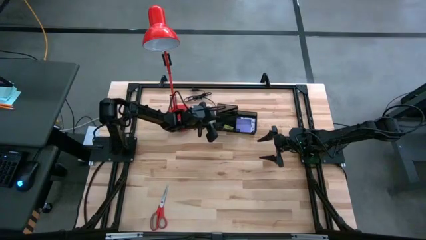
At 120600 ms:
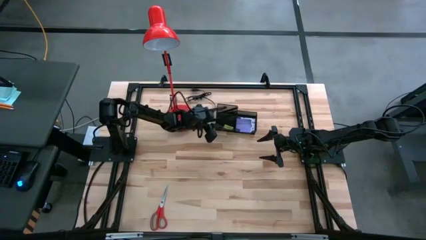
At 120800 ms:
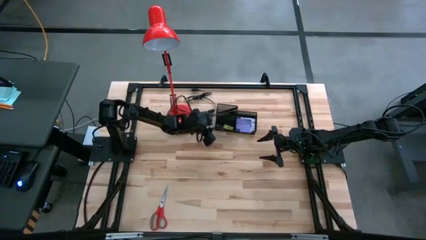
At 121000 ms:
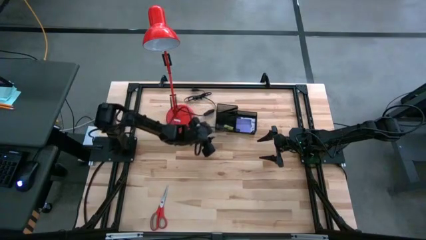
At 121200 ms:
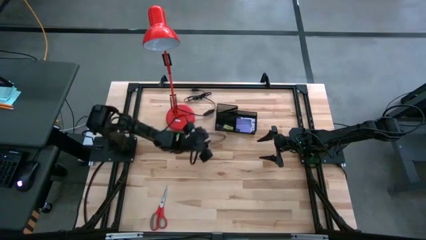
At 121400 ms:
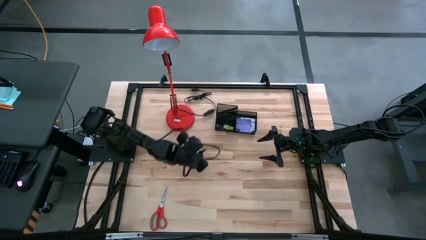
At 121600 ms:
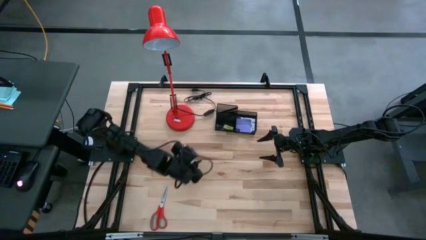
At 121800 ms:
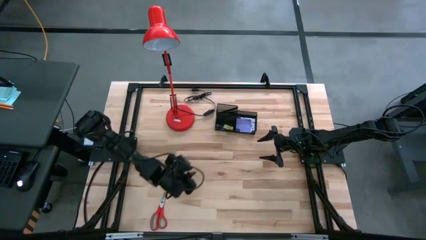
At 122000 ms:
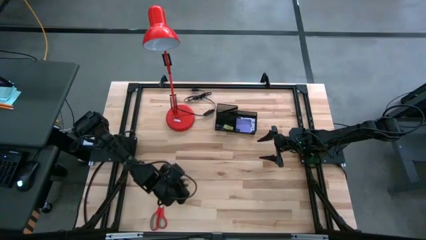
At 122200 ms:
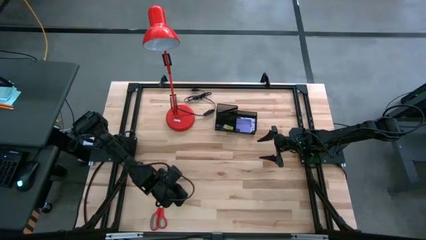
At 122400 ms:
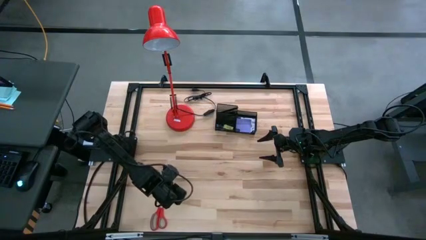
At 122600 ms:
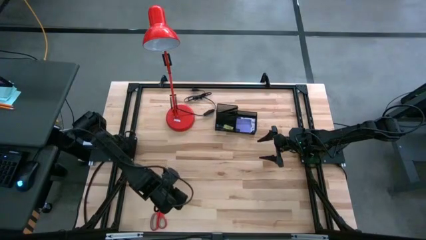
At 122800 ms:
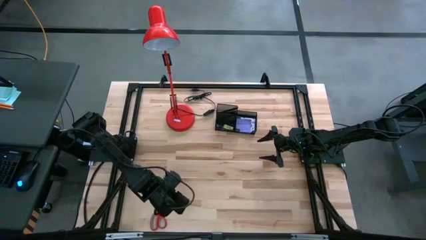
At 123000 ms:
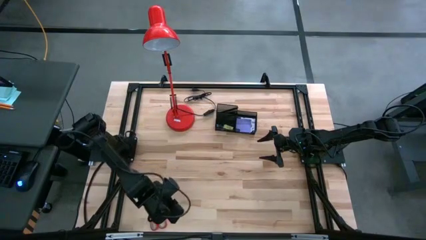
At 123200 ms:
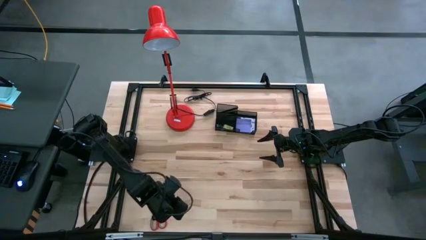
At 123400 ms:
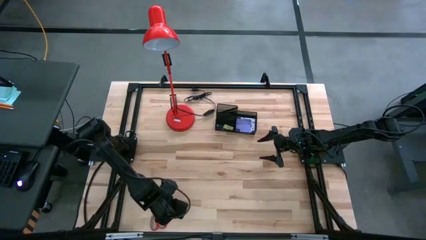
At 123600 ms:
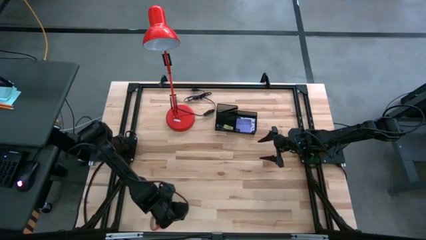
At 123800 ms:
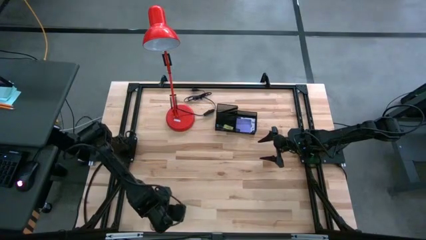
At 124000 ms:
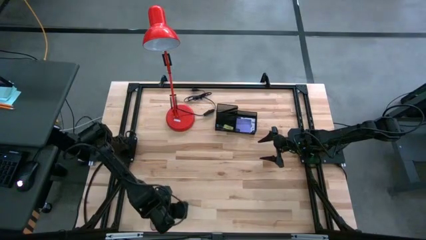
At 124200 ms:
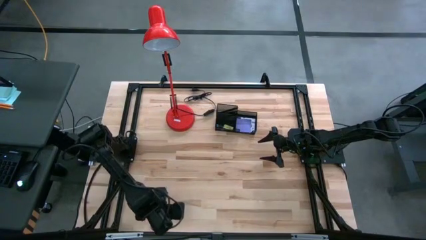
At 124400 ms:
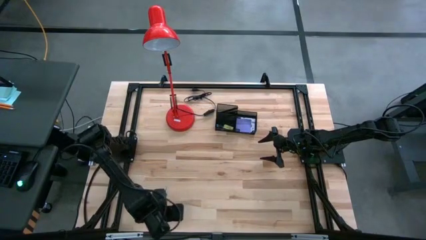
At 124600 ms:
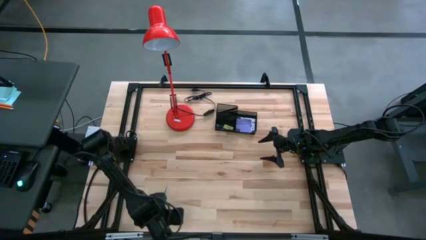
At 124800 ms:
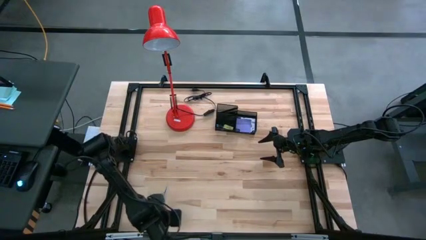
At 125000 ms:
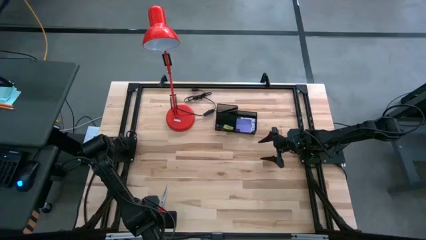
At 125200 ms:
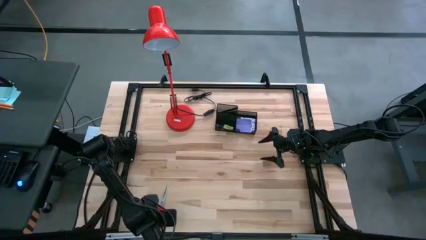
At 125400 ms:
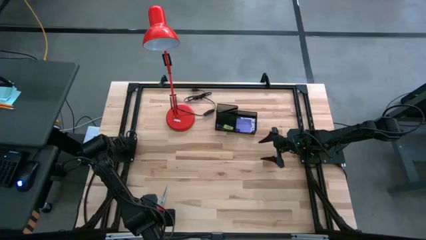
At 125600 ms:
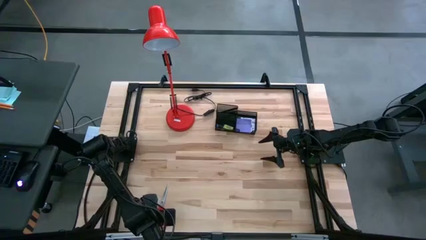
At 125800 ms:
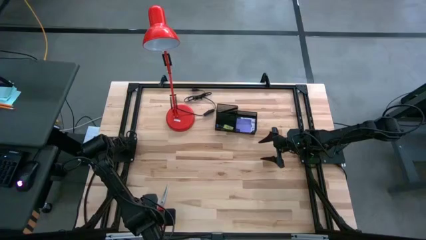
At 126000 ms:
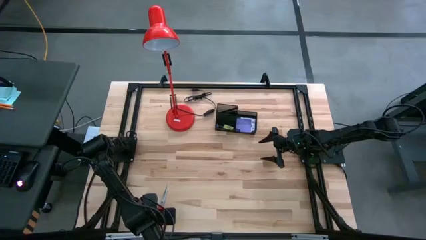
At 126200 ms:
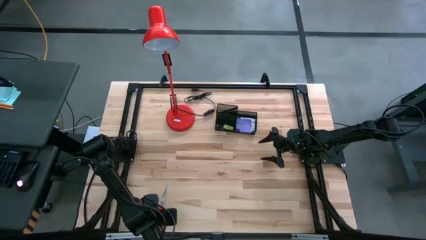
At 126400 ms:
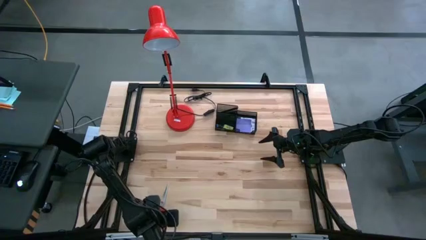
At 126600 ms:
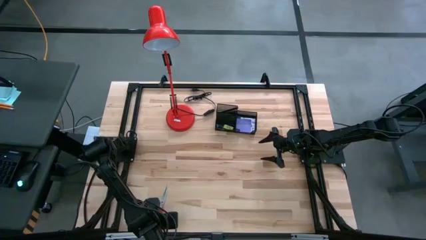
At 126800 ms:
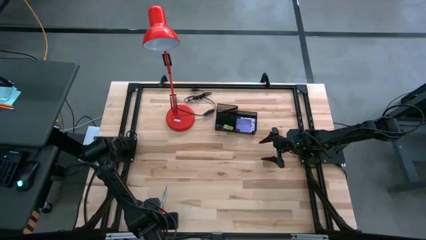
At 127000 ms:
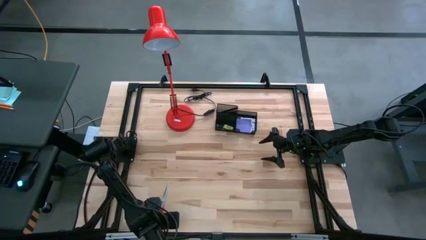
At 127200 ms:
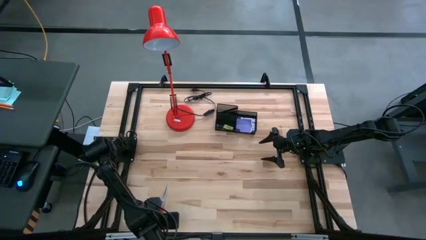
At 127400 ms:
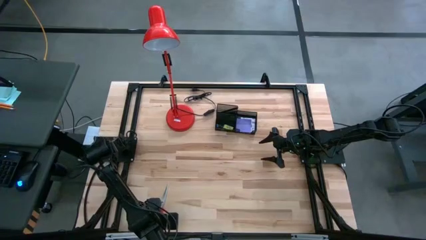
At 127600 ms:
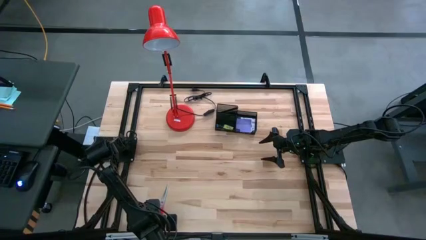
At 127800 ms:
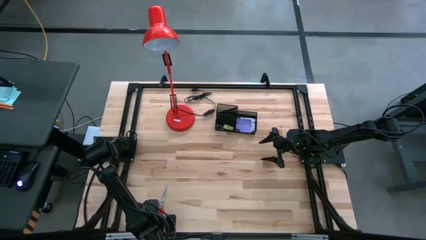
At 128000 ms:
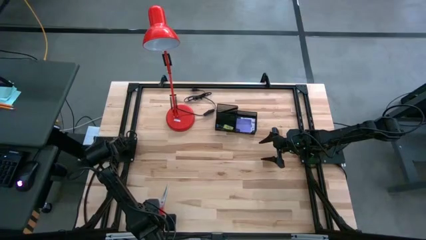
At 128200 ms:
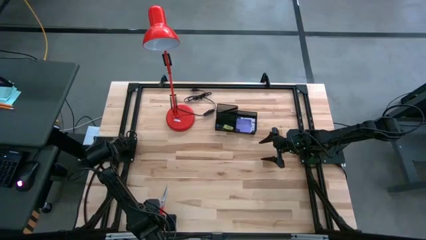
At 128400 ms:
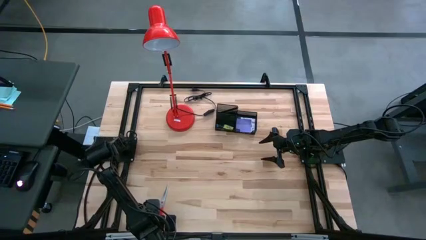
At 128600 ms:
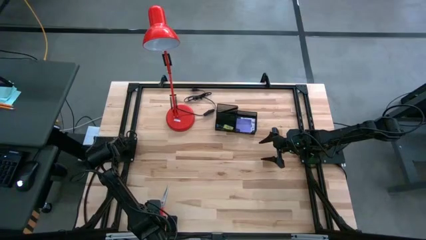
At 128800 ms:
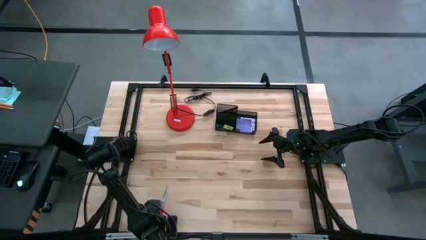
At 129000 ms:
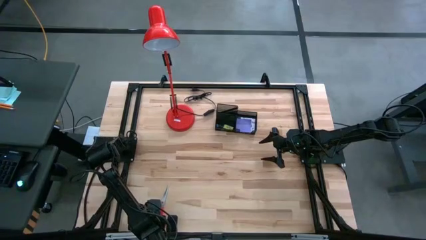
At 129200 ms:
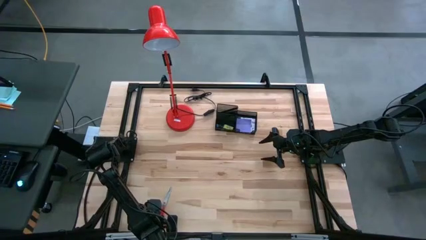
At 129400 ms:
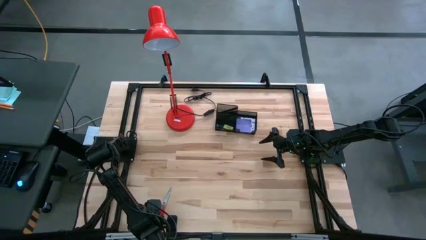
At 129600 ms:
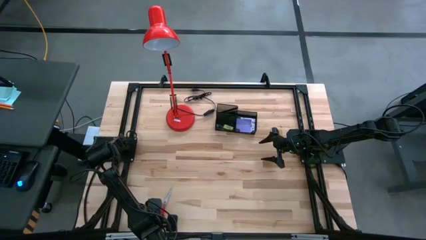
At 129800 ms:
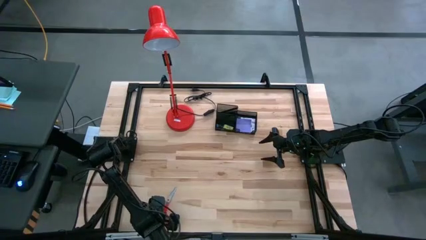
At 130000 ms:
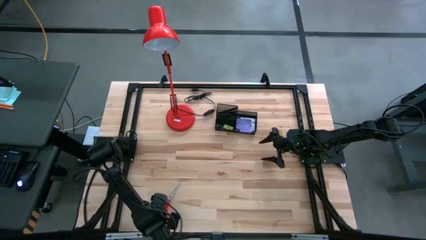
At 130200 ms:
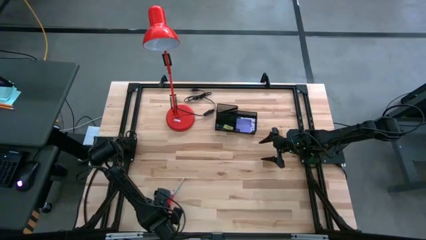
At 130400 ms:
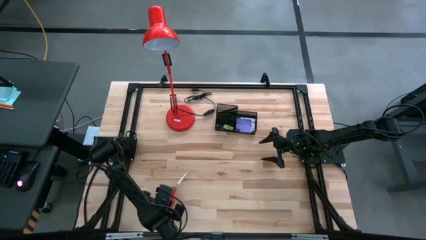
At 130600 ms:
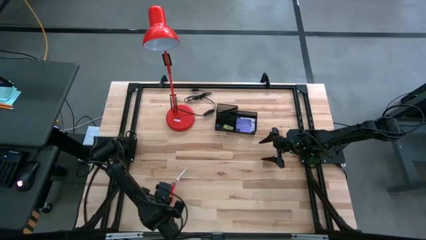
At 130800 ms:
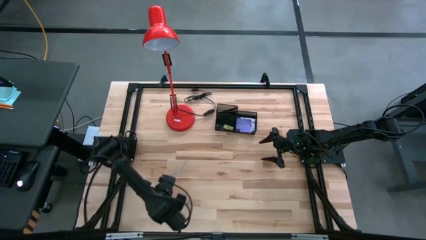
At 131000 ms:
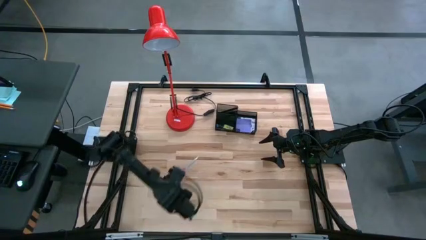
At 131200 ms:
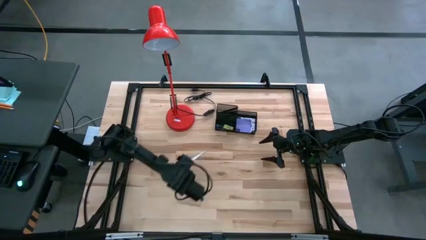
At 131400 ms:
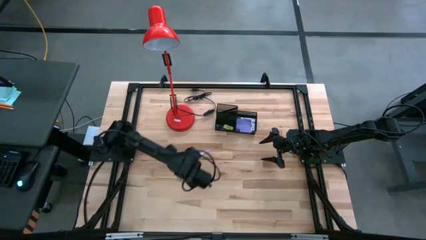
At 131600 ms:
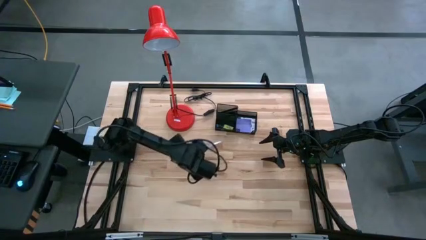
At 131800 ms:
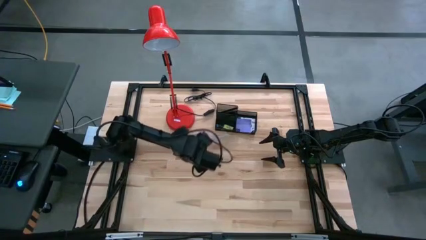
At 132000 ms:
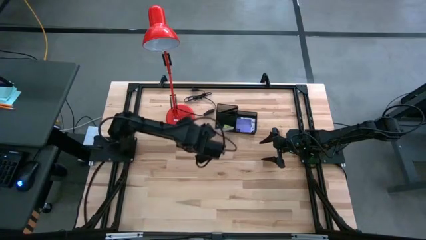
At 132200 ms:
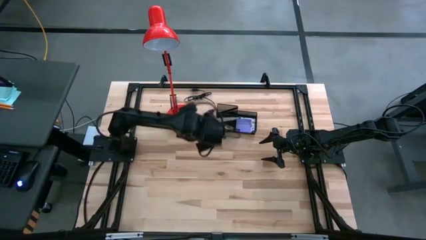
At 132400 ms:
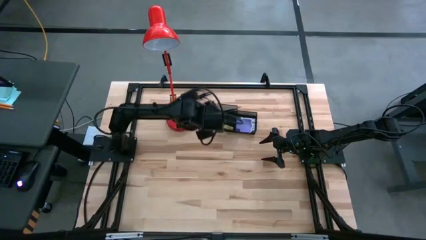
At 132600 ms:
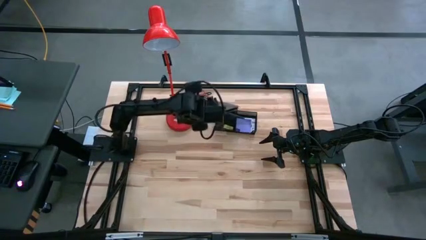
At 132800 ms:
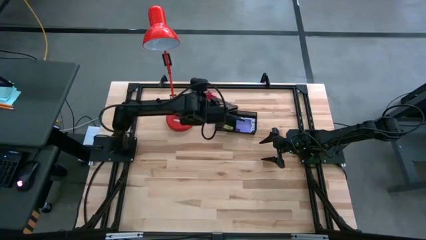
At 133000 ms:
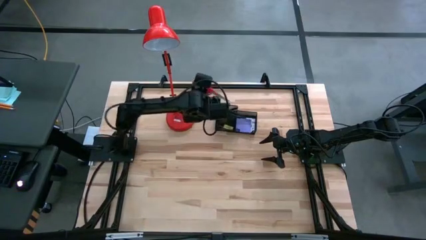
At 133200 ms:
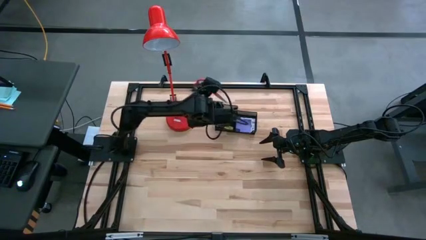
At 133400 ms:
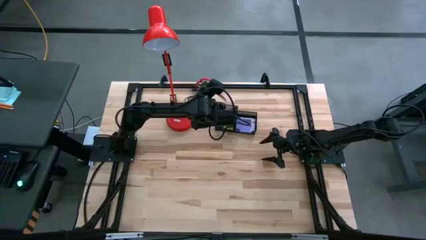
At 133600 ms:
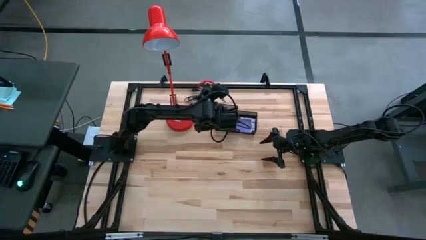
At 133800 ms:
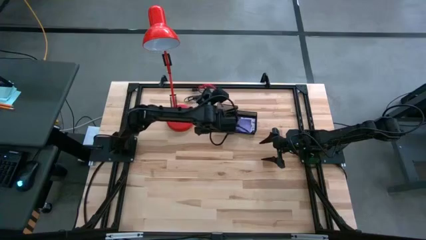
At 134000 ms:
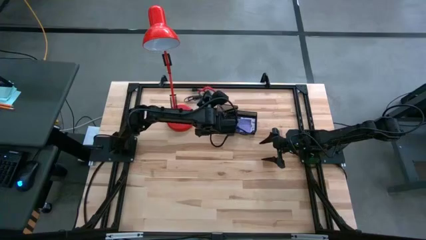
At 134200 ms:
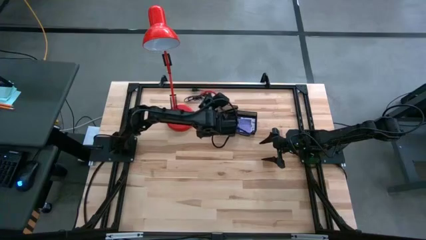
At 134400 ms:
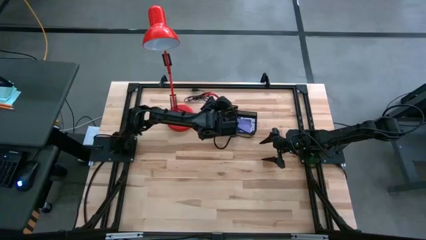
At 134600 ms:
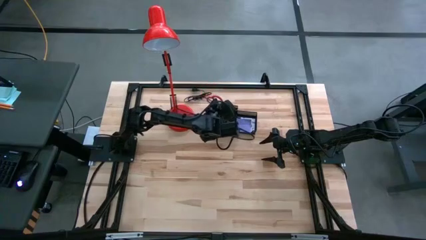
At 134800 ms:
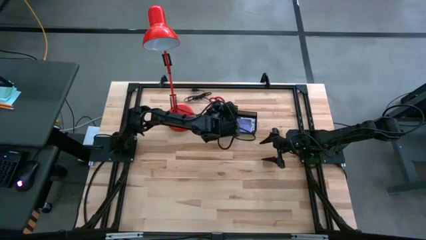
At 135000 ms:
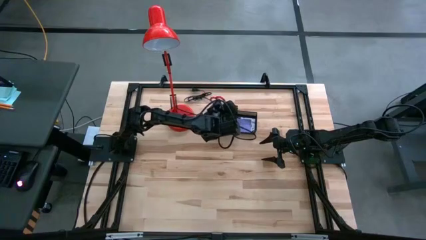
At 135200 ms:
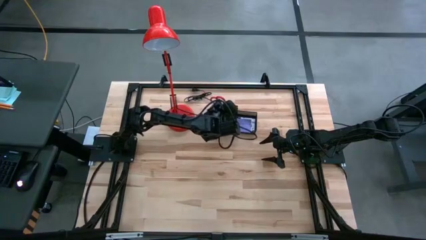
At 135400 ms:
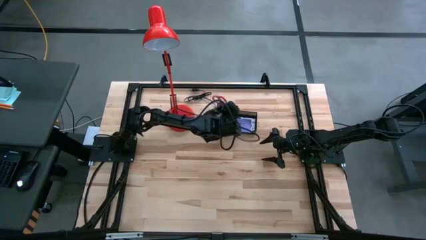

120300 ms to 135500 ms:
Task: Pick and place office supplies into organizer
Put the orange scissors into the black desk organizer
